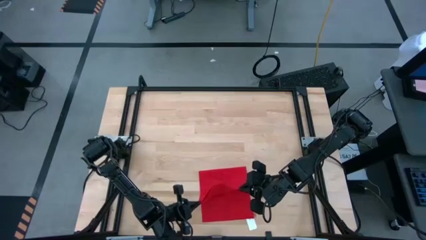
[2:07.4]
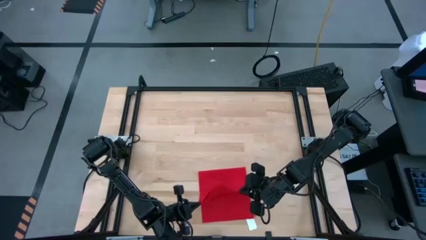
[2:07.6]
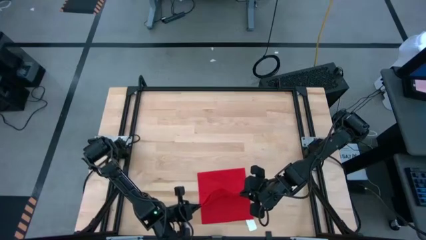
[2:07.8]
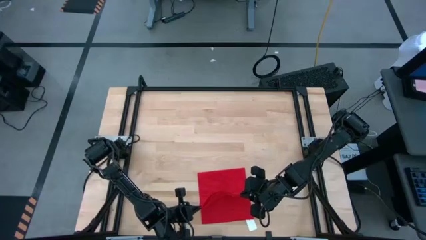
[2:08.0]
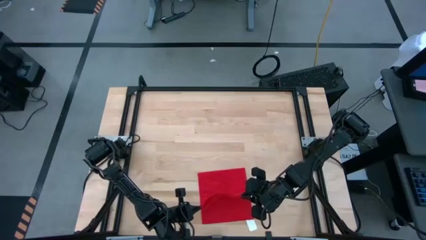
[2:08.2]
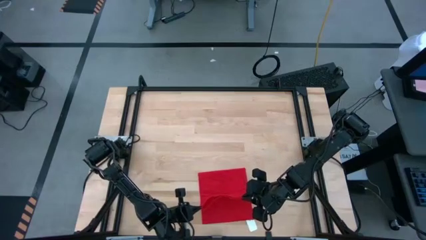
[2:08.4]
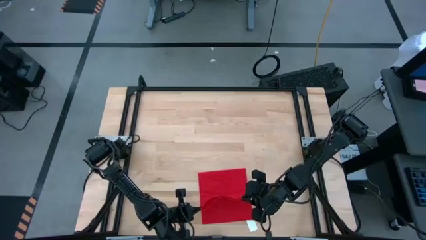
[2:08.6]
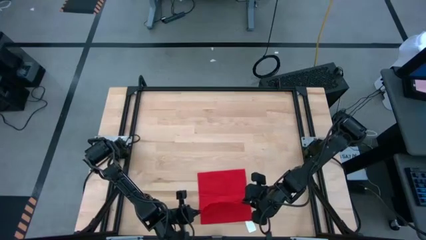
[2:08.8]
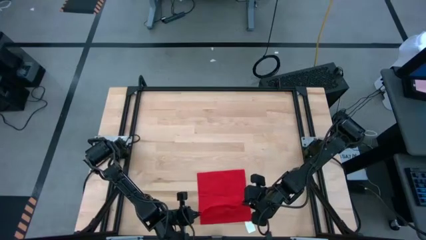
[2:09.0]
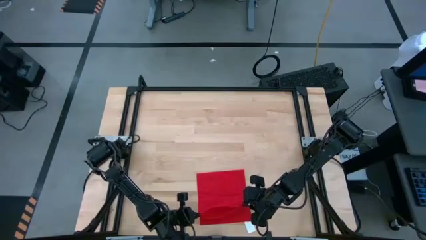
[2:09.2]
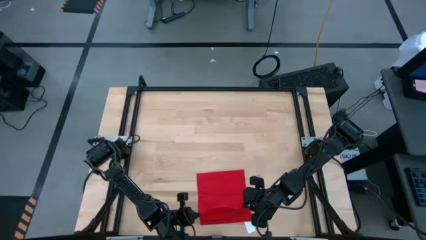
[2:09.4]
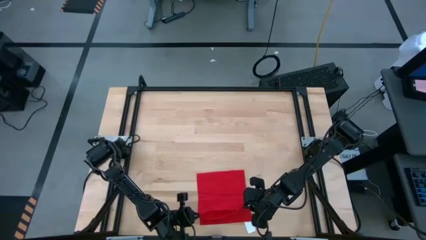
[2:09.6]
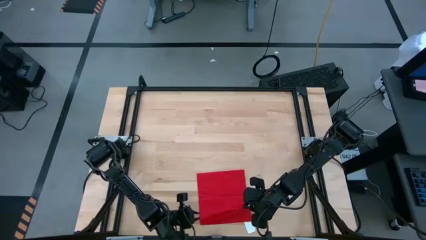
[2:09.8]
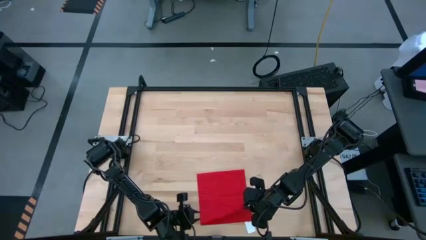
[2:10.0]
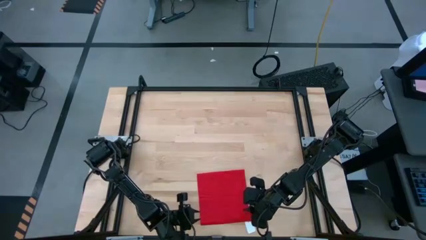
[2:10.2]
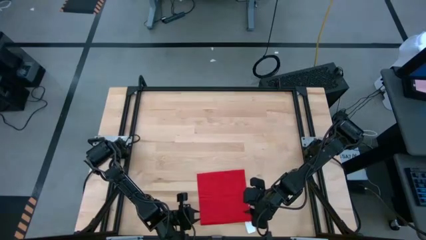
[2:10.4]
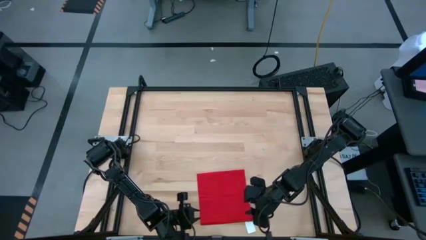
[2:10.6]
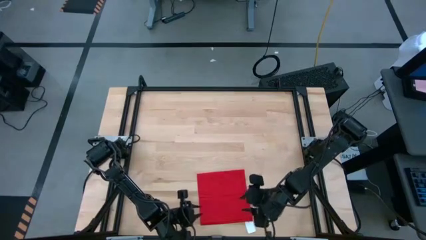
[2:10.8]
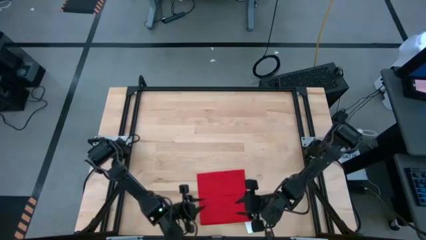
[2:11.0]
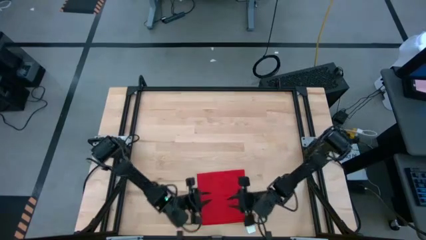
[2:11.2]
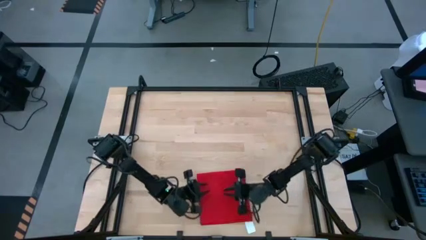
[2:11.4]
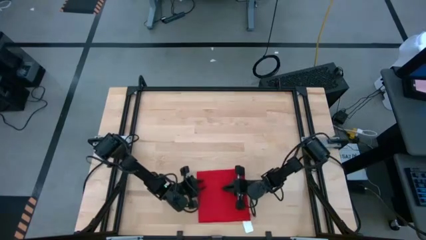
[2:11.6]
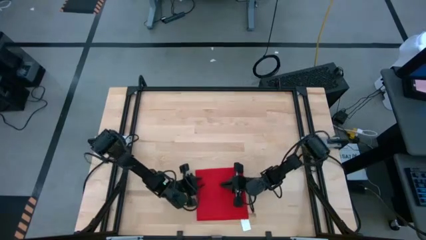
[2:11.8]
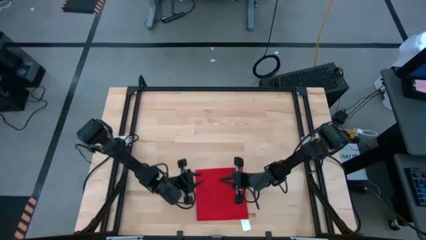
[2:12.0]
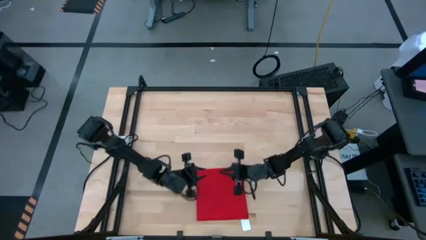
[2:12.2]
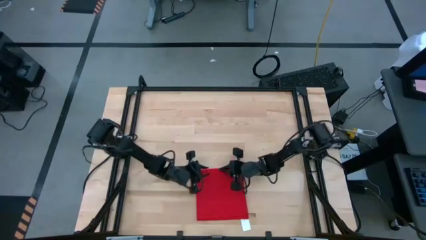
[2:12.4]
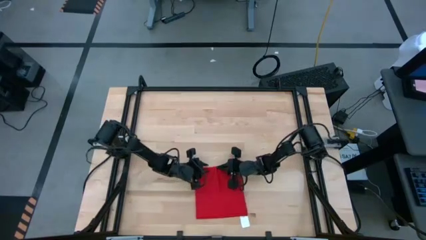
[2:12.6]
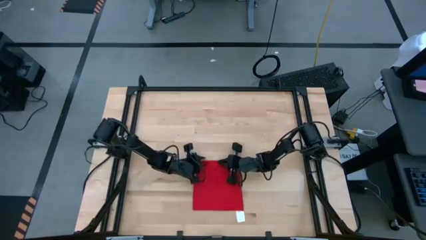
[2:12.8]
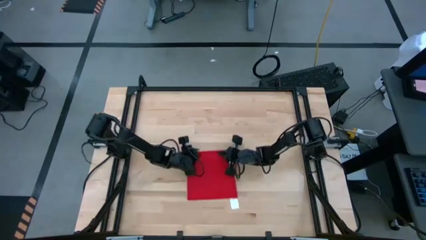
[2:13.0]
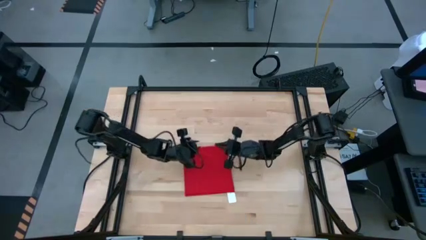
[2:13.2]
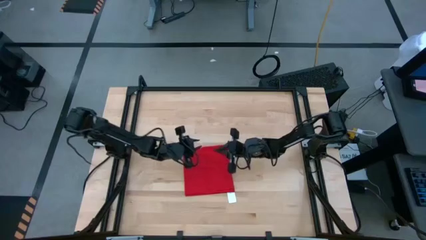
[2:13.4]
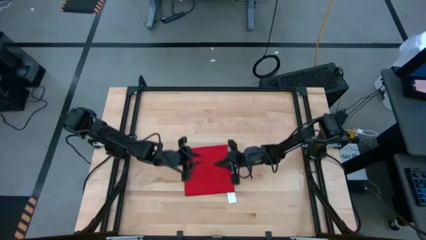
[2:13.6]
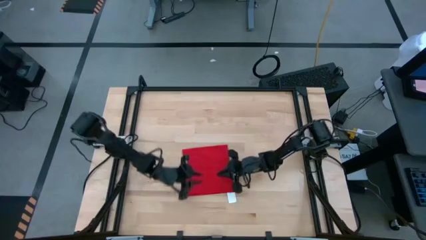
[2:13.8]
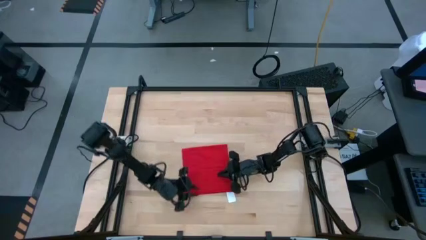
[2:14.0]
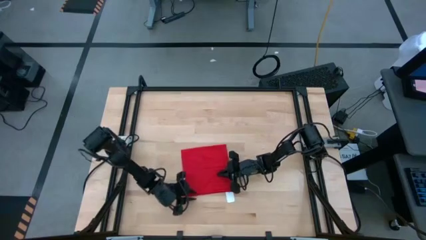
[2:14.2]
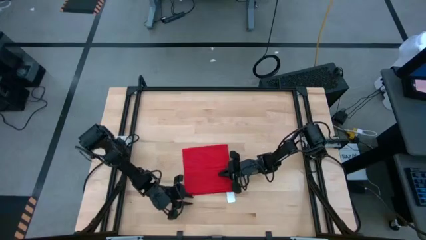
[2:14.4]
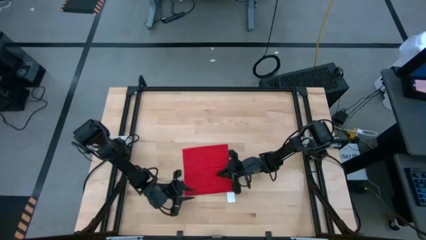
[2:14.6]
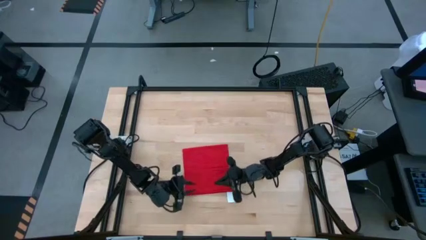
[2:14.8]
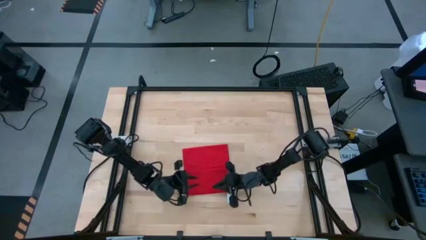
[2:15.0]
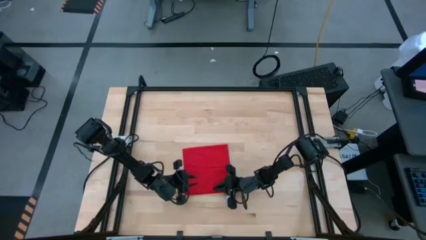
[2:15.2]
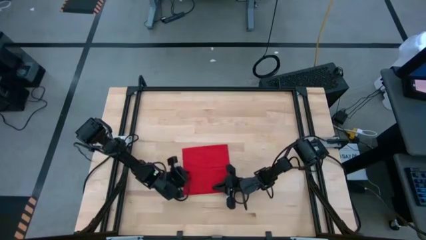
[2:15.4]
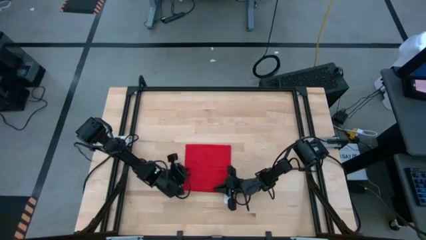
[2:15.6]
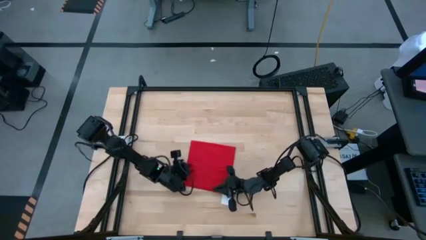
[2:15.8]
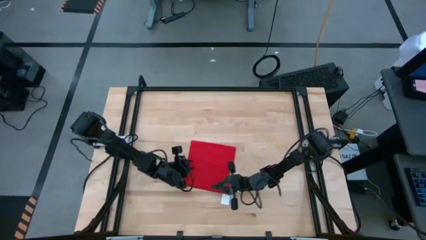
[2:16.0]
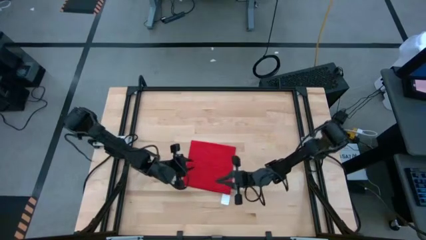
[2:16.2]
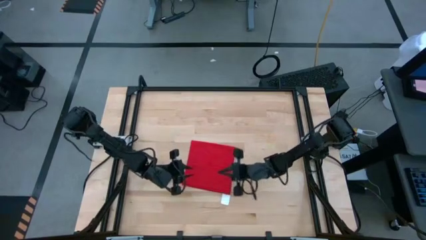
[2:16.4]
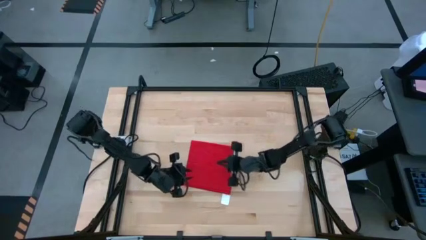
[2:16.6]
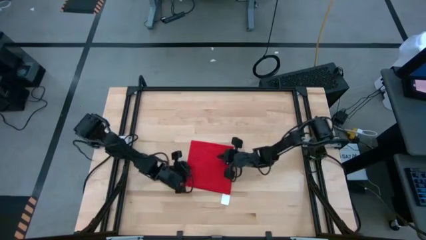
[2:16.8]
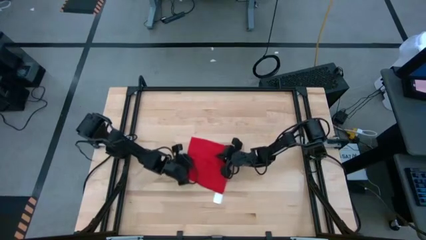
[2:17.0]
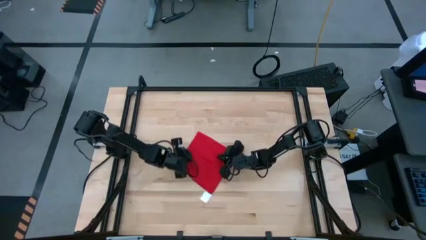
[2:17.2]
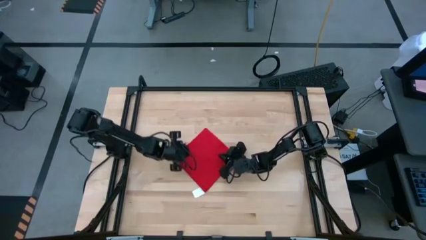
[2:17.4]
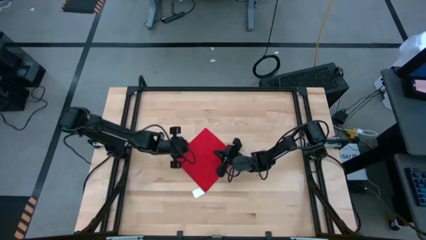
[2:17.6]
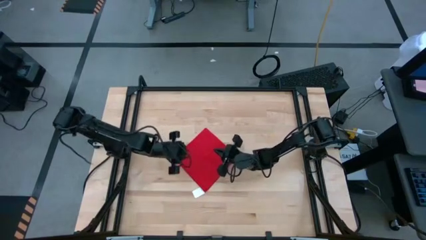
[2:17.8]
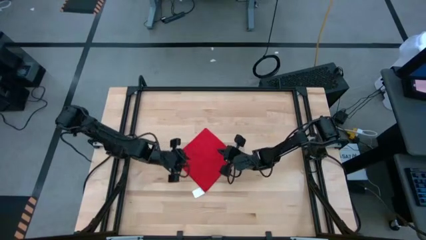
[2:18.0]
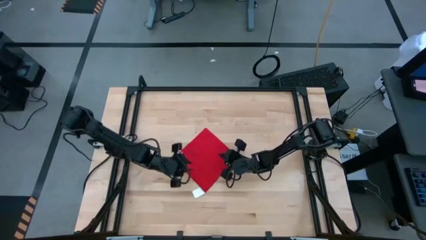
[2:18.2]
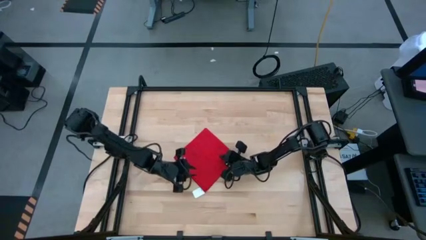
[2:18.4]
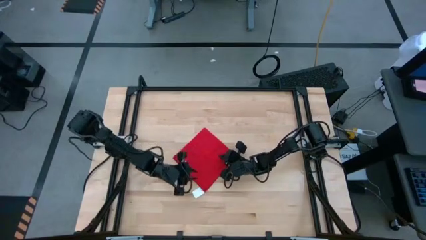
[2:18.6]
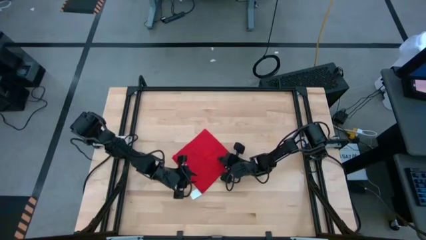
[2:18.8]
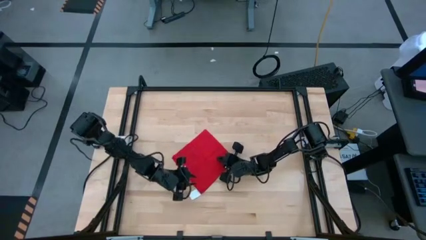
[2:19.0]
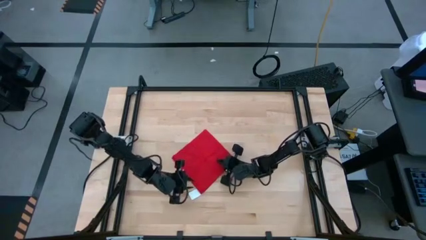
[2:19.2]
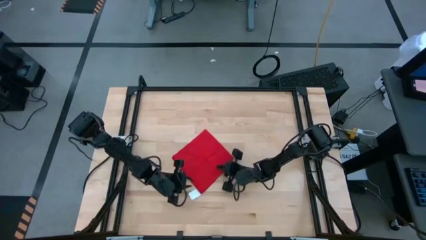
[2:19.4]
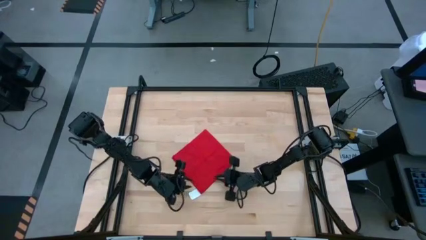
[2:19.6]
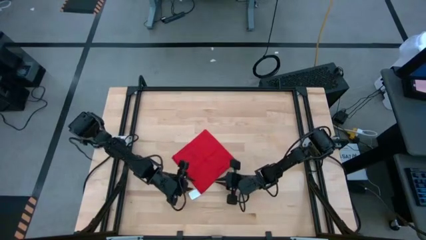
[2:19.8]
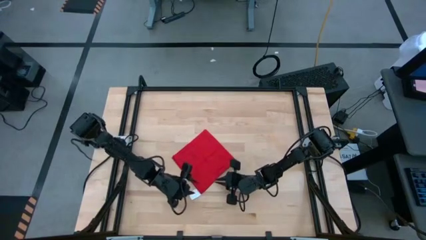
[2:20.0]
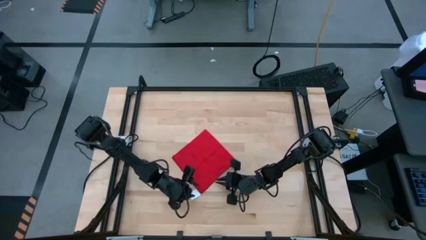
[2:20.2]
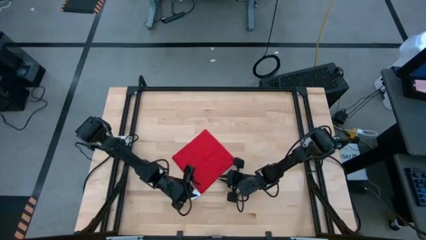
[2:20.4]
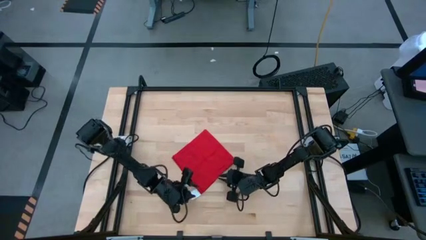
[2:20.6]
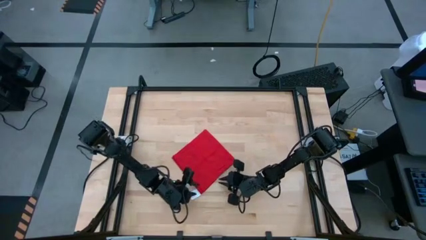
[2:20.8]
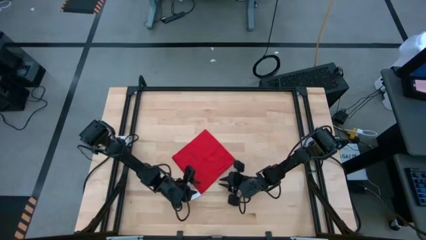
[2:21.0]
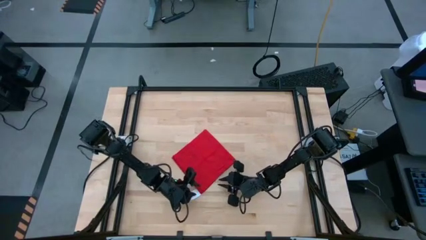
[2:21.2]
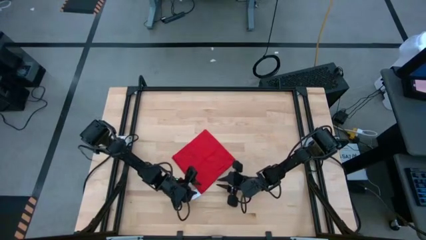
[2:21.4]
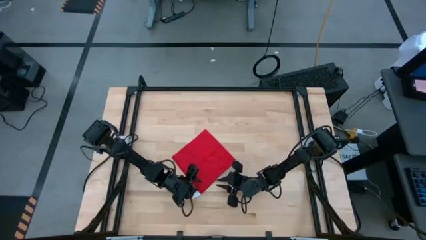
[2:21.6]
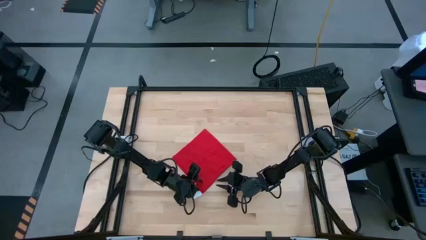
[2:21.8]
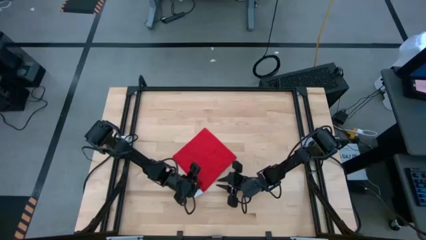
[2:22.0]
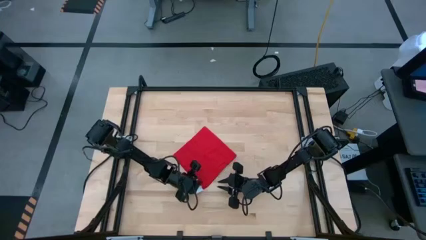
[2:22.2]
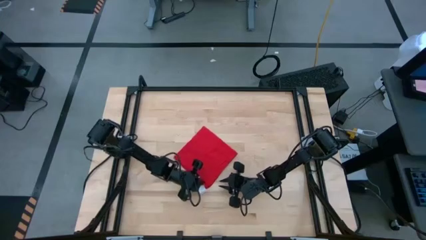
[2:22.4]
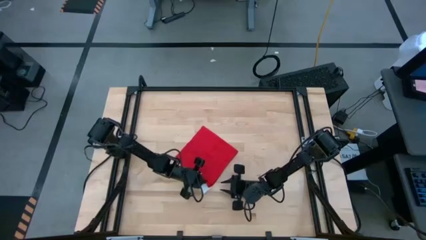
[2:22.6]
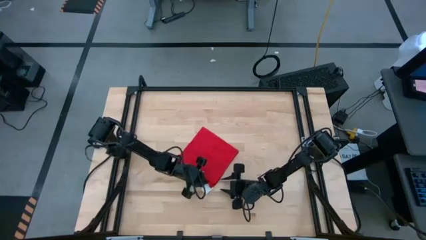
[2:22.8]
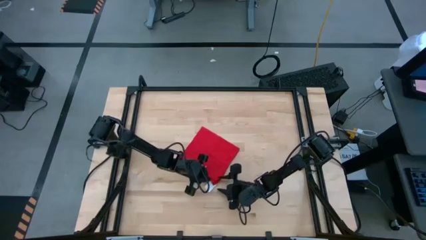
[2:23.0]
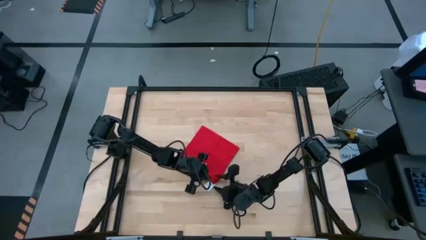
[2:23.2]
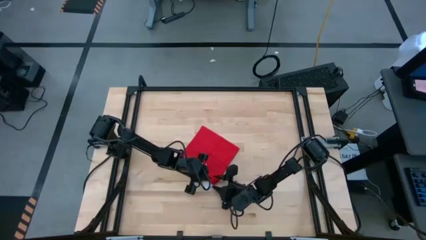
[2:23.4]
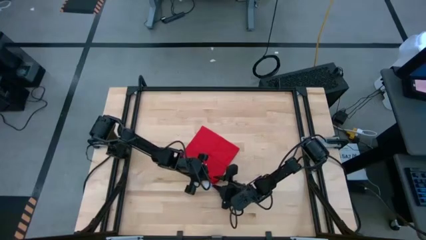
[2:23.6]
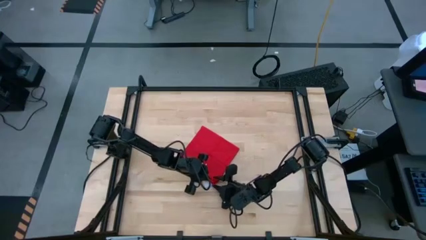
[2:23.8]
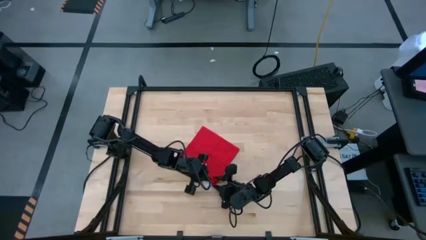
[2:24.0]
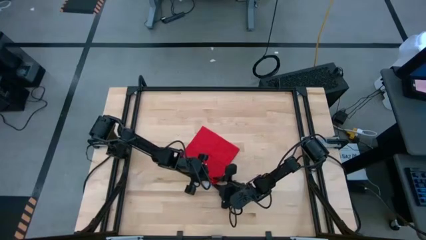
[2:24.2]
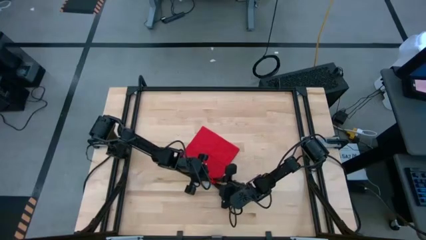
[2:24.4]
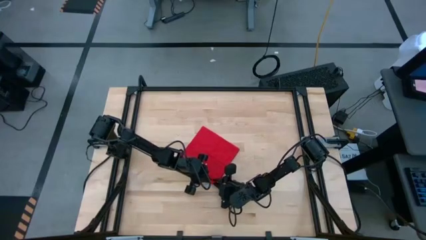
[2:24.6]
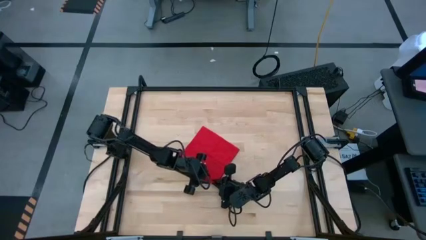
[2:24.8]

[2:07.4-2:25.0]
Task: Roll napkin
Fold the red napkin
